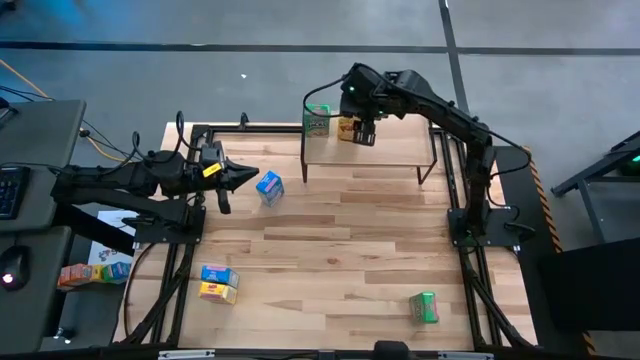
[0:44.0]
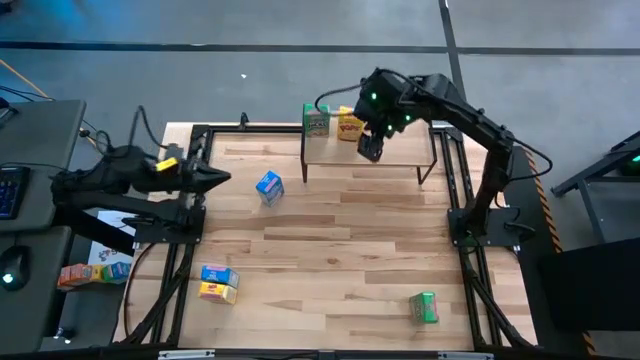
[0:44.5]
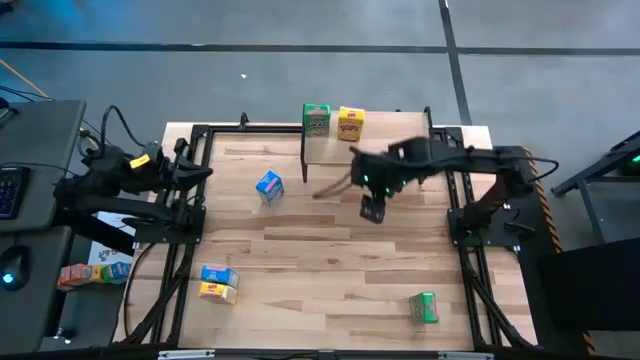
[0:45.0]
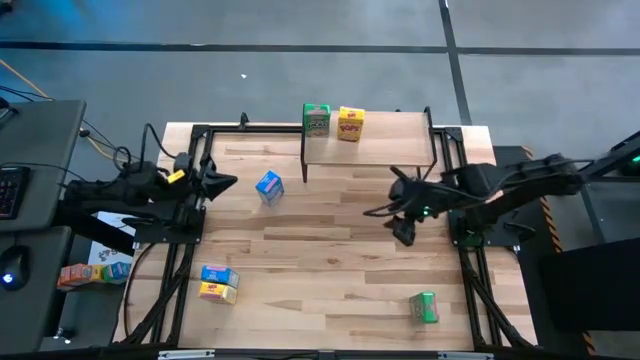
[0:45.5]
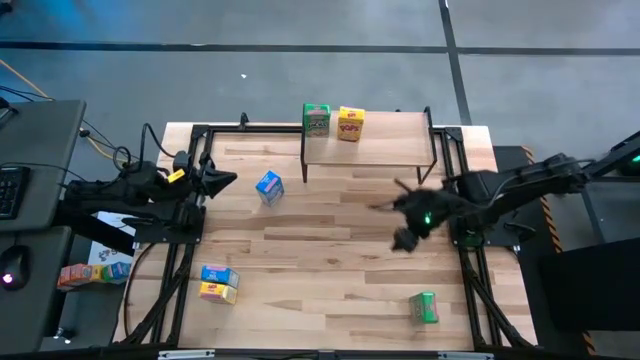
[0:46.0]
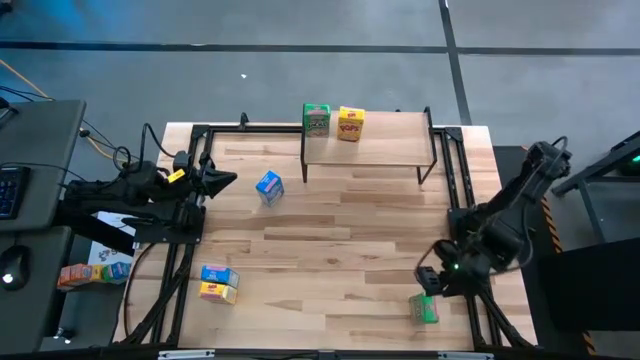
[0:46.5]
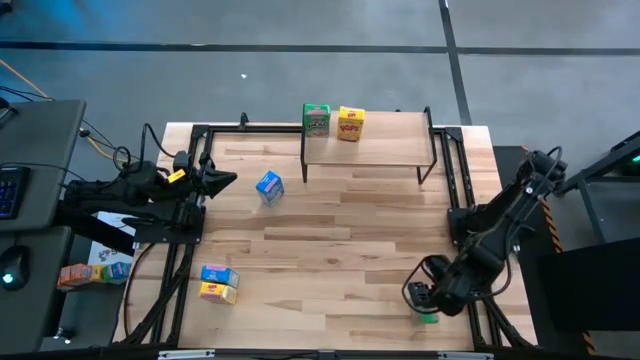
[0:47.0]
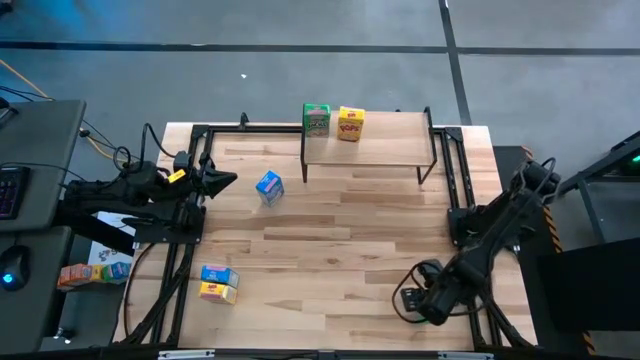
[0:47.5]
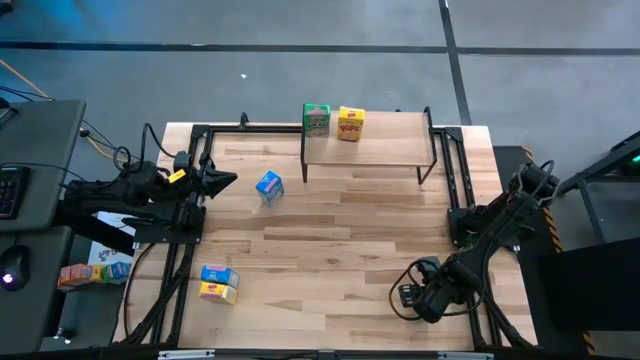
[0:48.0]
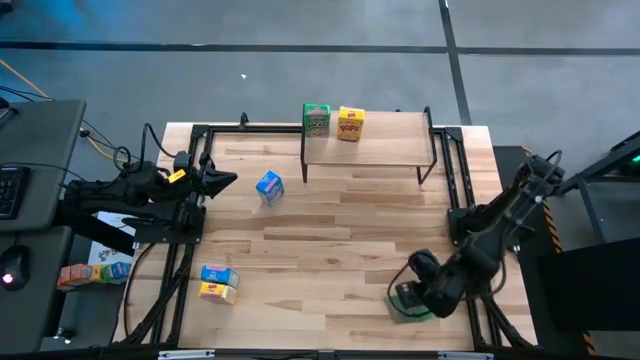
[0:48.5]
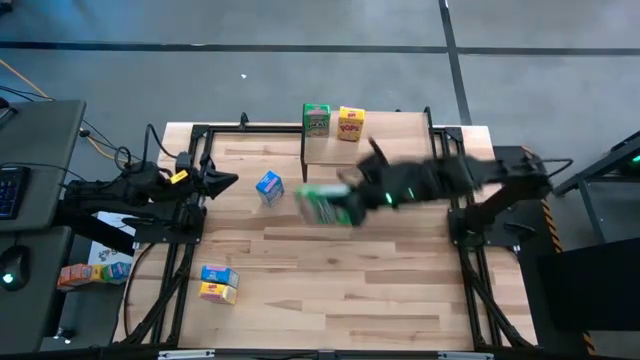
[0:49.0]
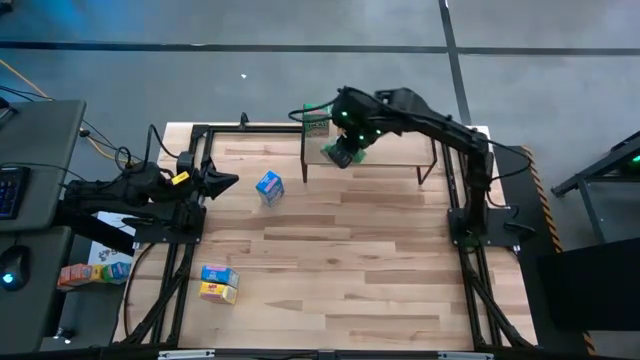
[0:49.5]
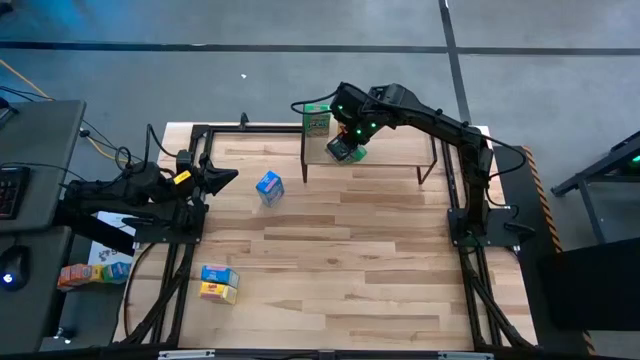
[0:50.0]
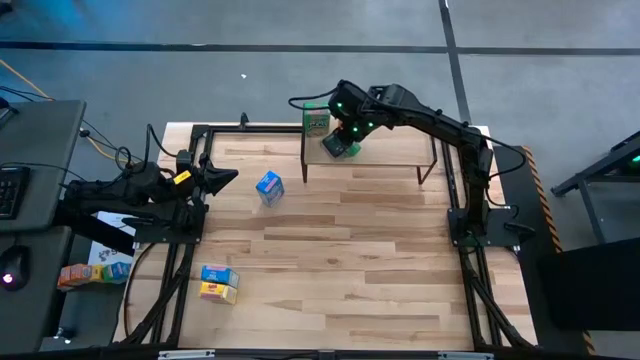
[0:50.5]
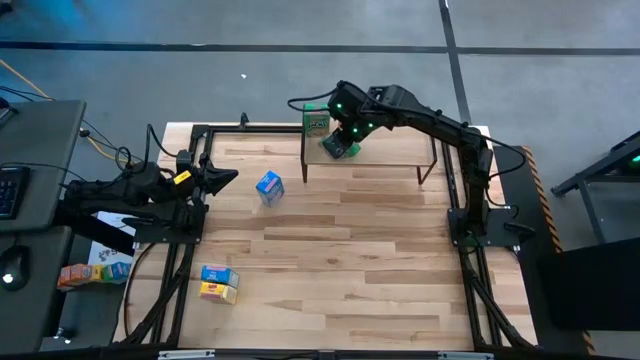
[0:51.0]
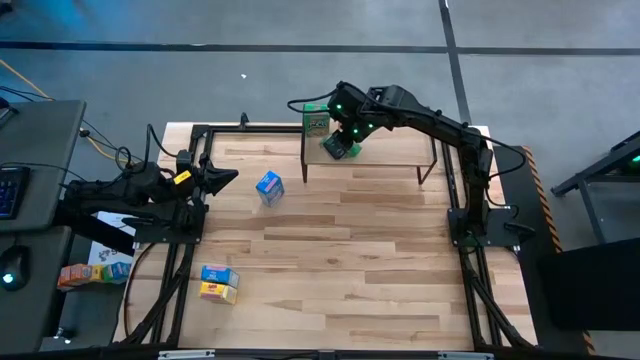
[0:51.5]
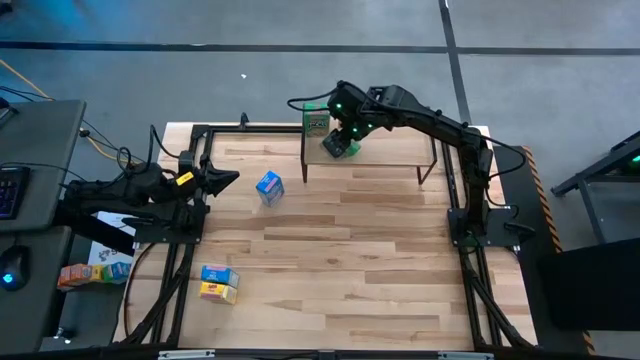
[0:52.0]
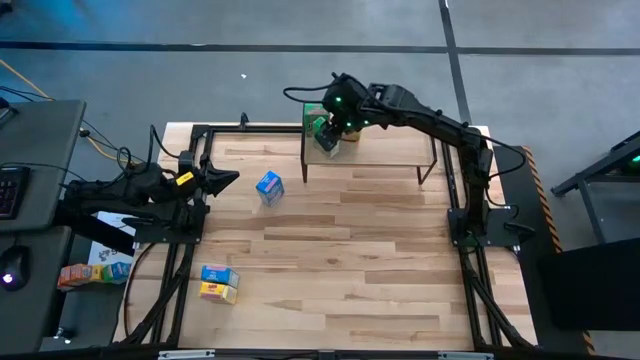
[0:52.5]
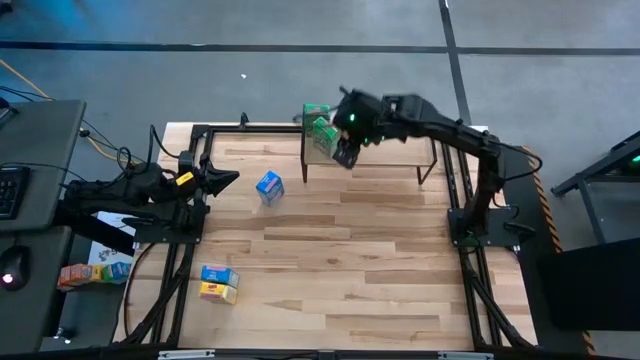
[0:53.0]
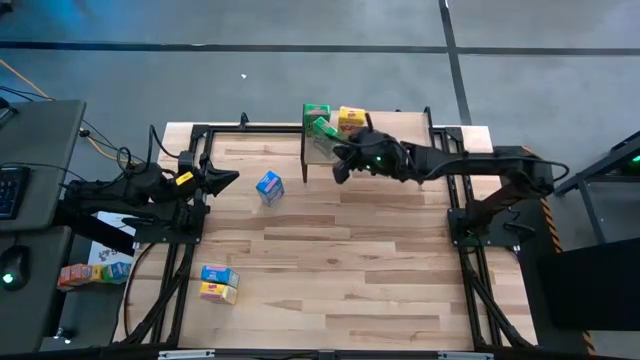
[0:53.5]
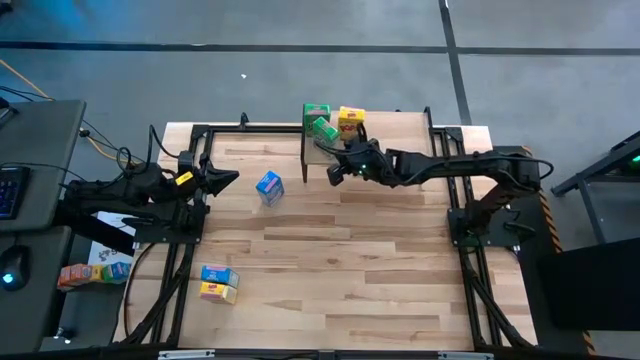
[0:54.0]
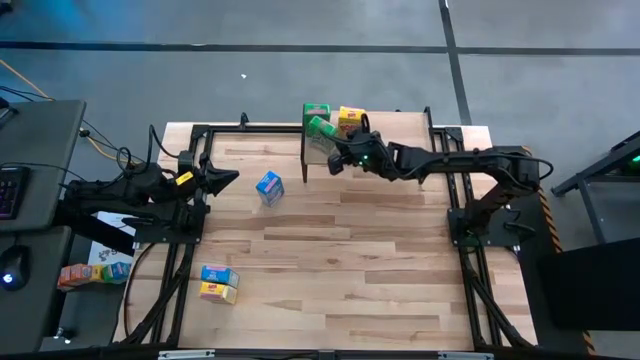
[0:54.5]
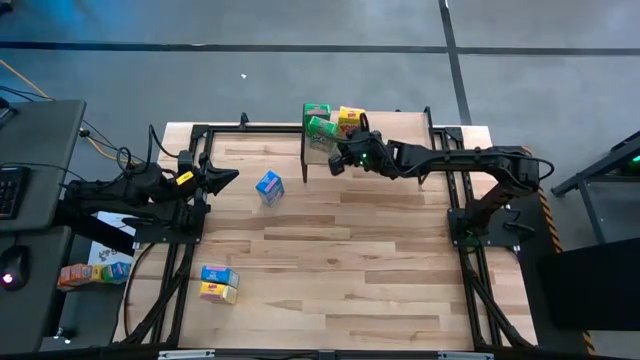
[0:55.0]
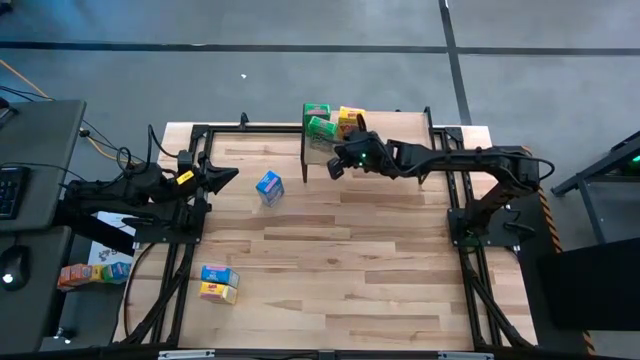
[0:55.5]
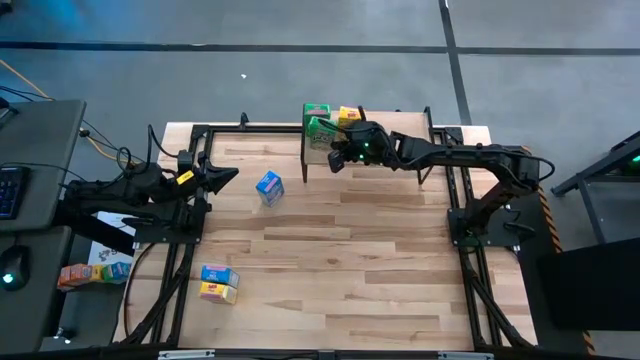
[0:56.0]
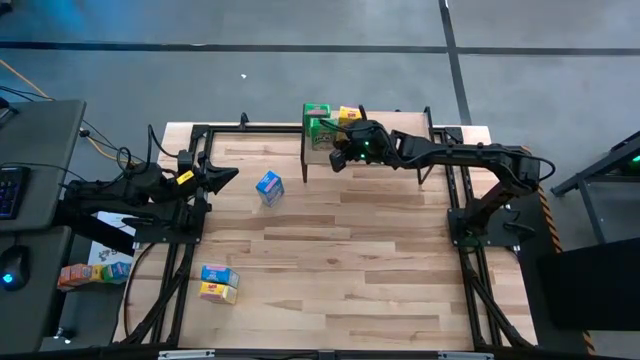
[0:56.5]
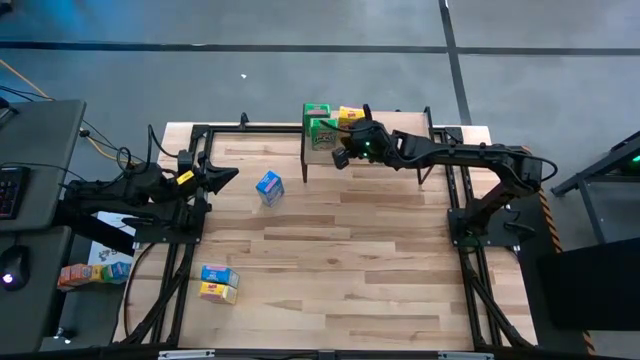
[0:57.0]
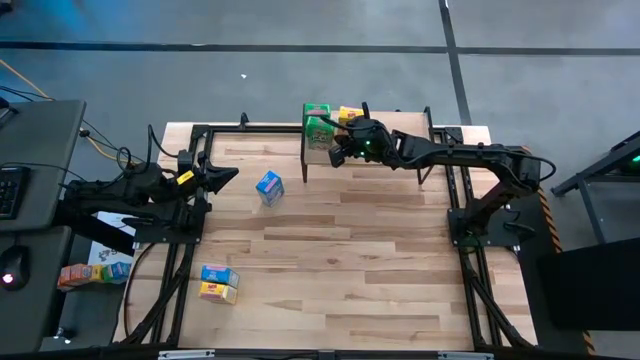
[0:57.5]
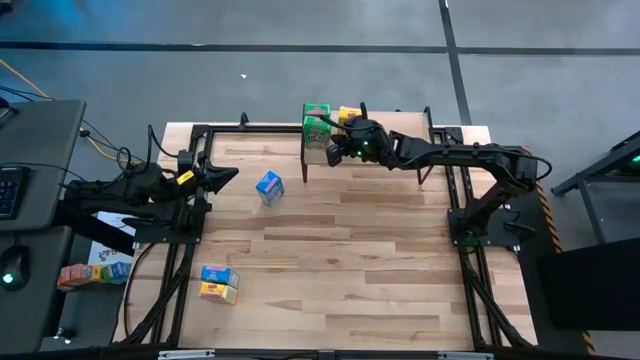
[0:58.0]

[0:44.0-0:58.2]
Task: Stack cereal on shelf
Put the green cereal box on the shelf

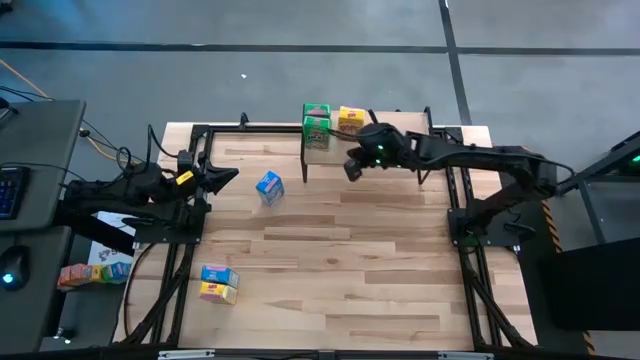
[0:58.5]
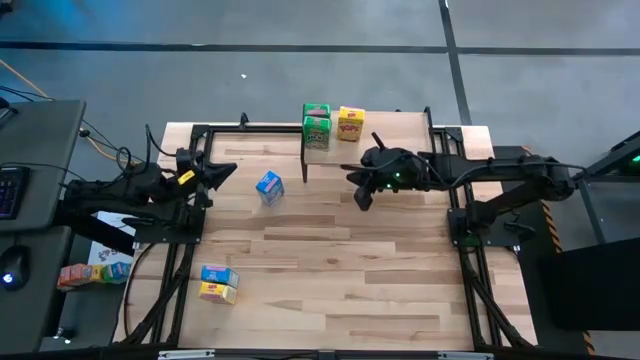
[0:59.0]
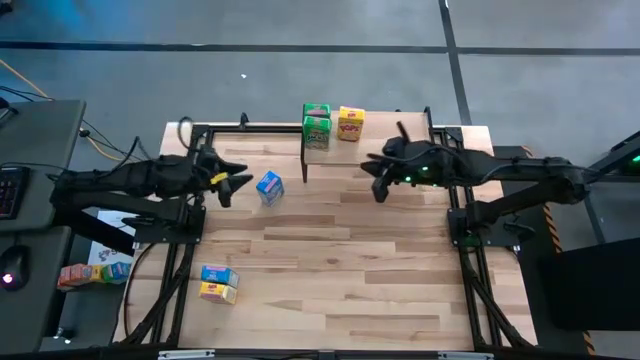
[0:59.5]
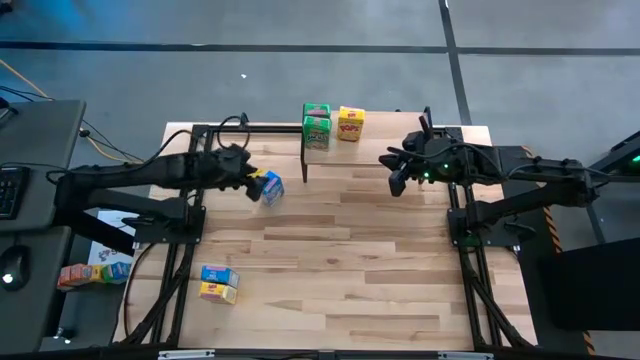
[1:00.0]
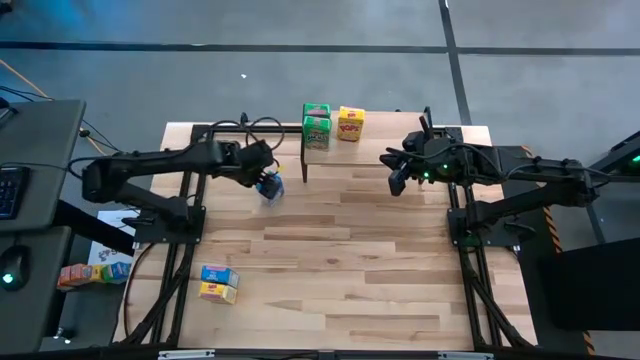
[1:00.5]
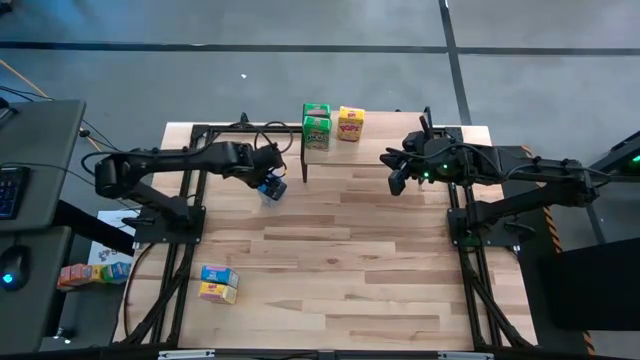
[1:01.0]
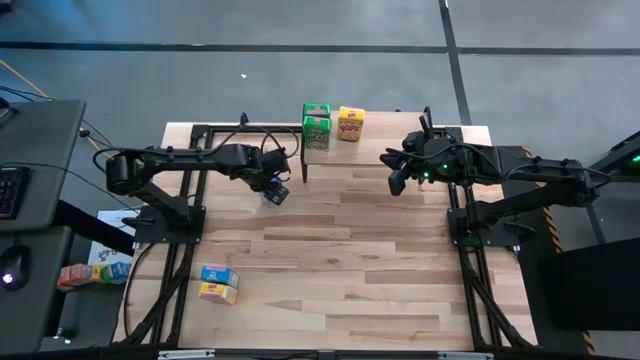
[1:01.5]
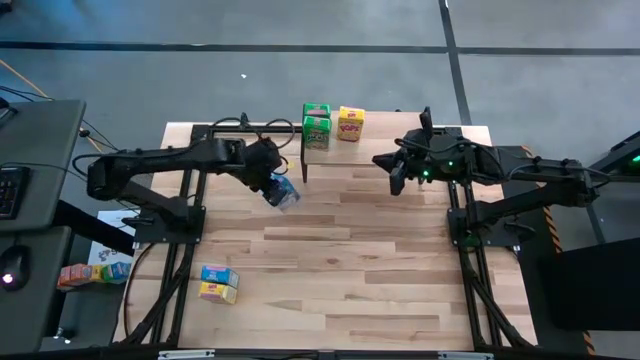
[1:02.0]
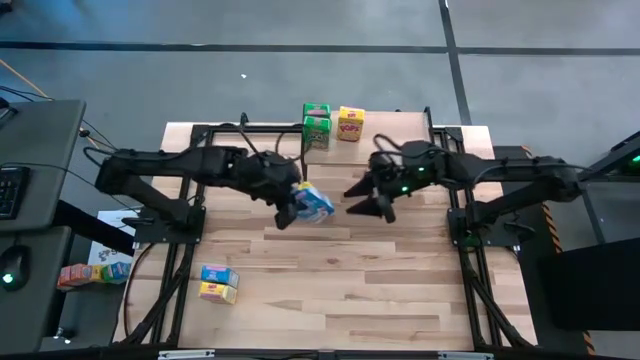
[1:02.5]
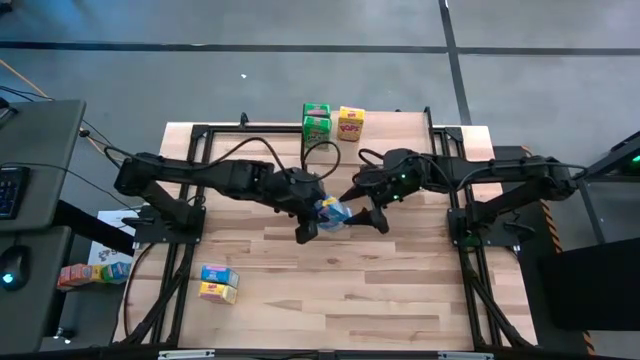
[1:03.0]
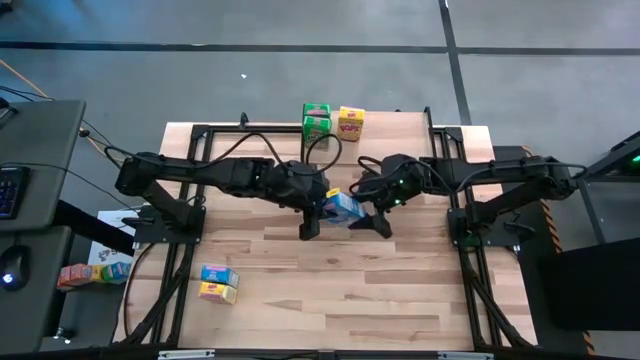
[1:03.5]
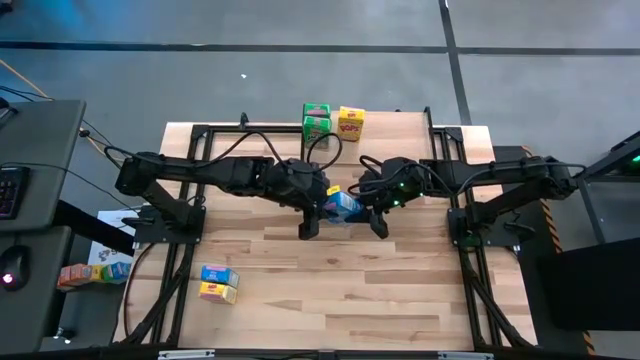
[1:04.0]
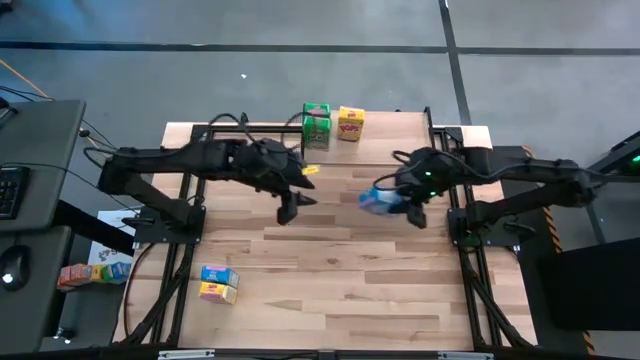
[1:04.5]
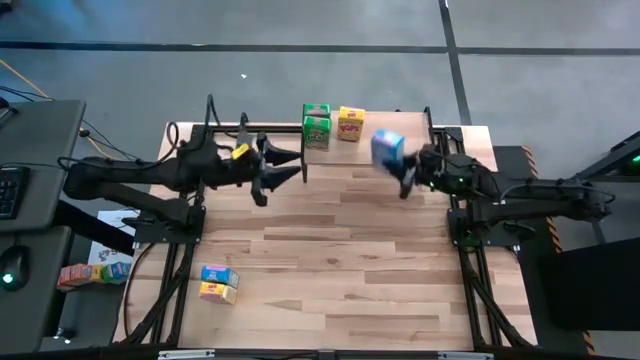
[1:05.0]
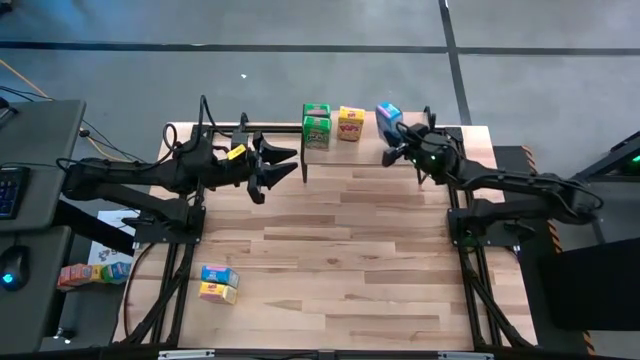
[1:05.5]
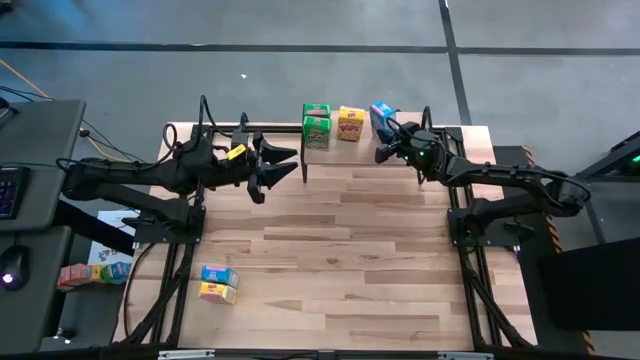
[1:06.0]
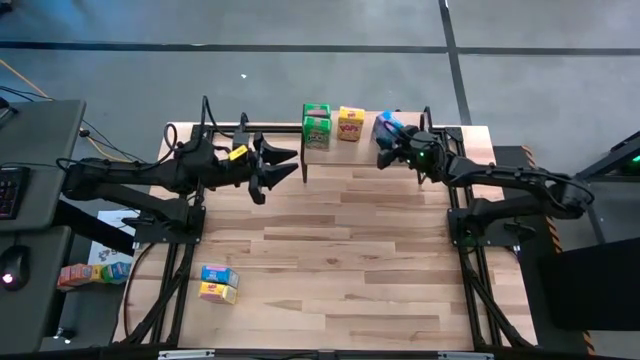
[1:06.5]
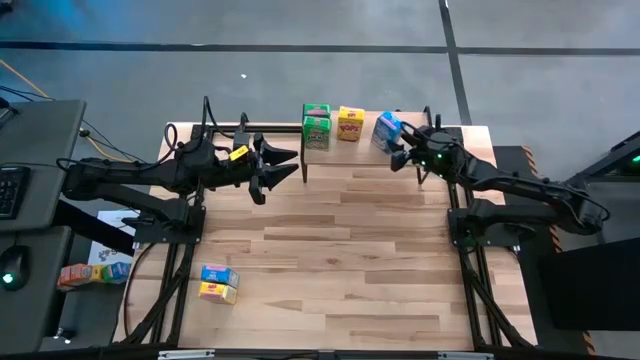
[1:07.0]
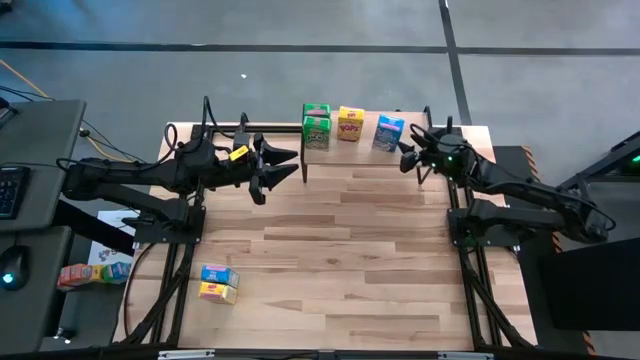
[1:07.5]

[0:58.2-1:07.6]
Put the top blue cereal box on the shelf
